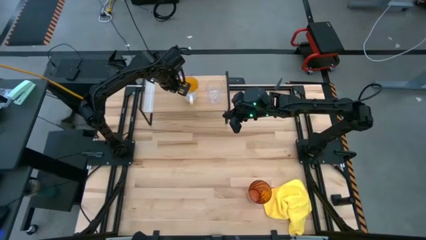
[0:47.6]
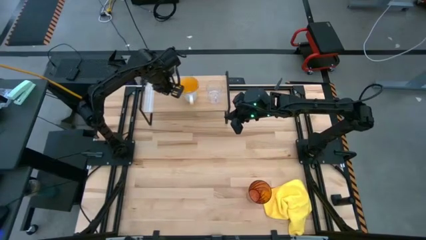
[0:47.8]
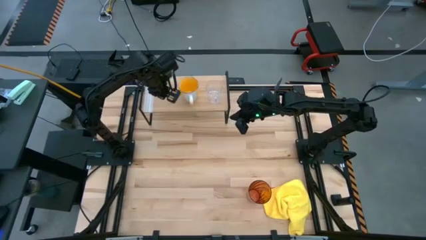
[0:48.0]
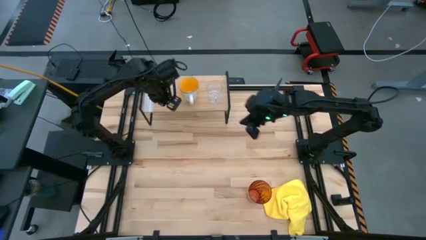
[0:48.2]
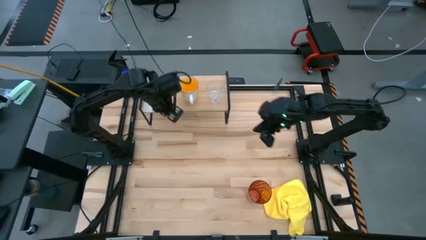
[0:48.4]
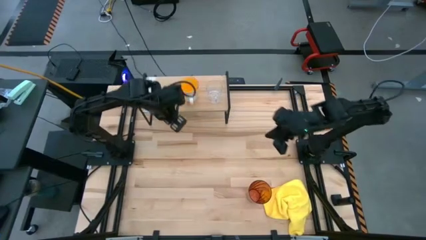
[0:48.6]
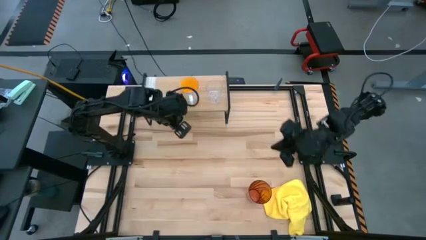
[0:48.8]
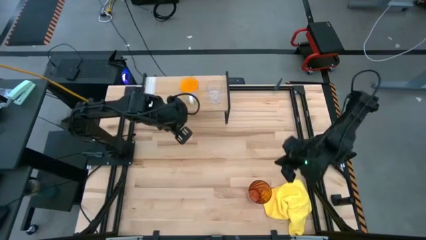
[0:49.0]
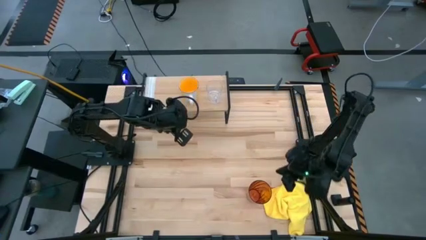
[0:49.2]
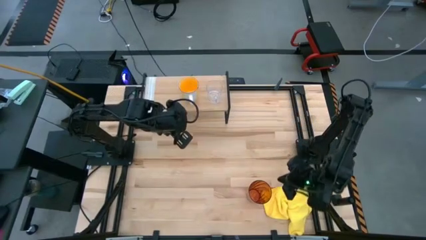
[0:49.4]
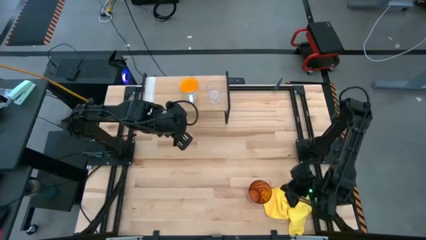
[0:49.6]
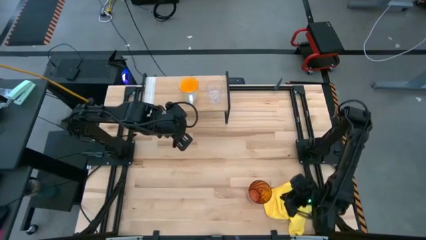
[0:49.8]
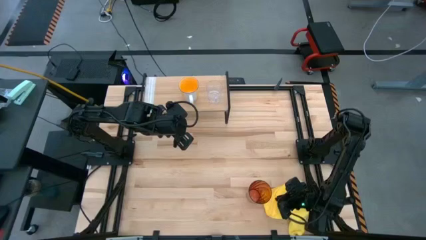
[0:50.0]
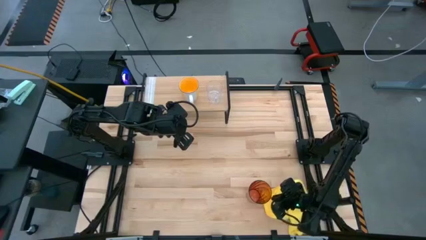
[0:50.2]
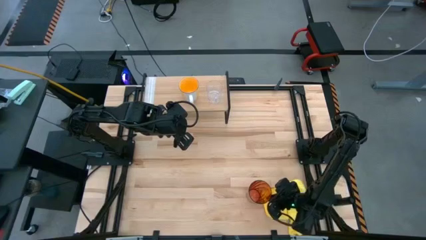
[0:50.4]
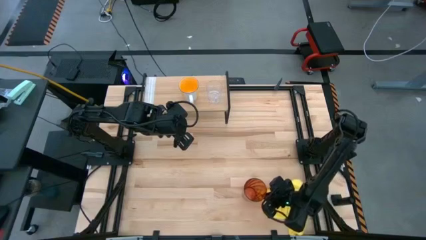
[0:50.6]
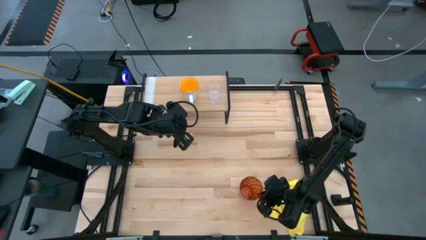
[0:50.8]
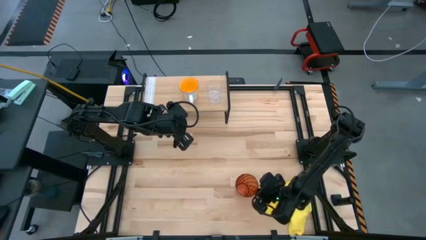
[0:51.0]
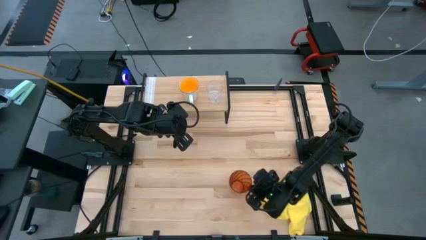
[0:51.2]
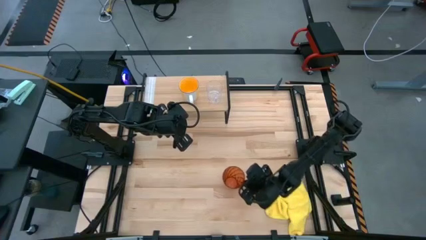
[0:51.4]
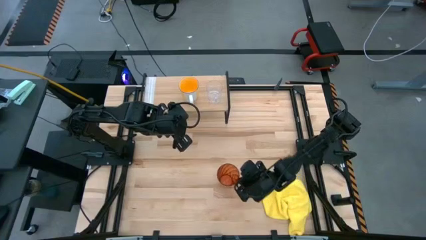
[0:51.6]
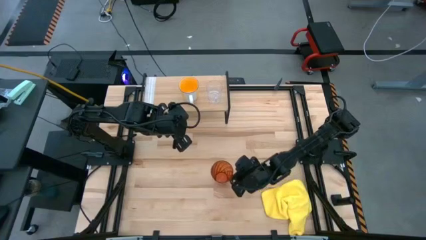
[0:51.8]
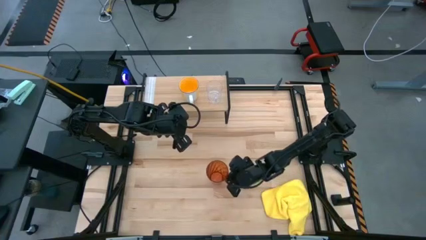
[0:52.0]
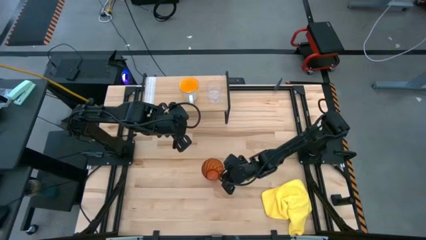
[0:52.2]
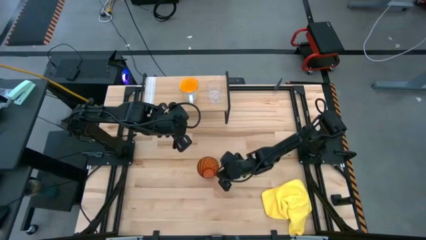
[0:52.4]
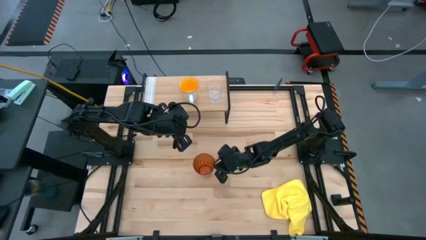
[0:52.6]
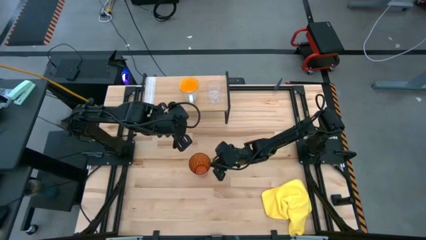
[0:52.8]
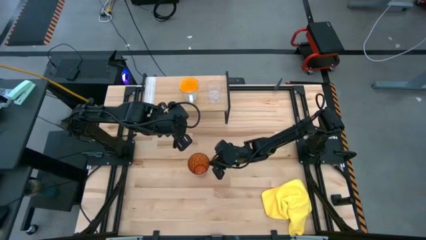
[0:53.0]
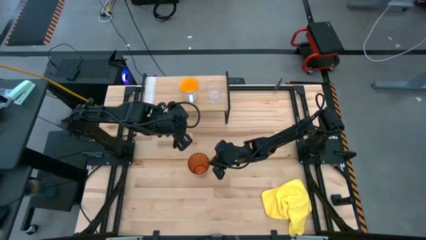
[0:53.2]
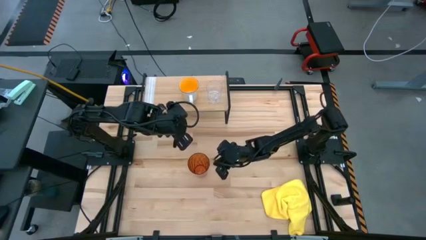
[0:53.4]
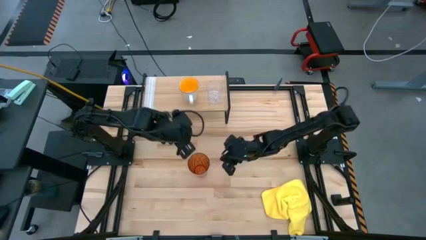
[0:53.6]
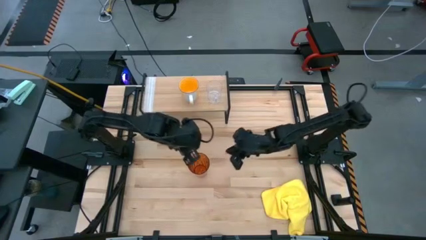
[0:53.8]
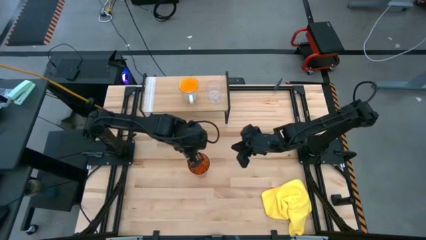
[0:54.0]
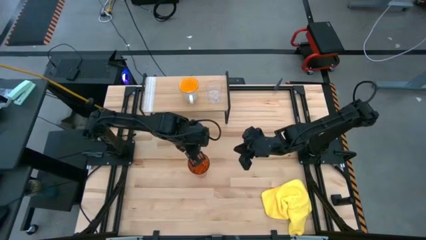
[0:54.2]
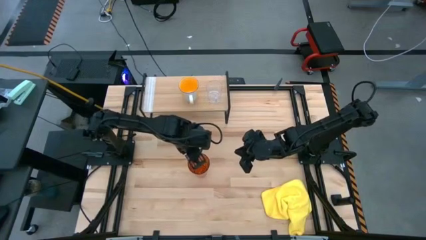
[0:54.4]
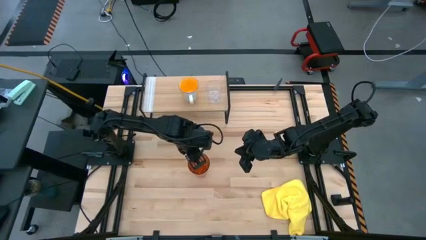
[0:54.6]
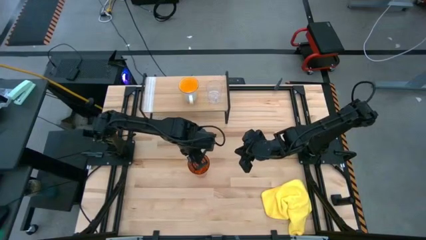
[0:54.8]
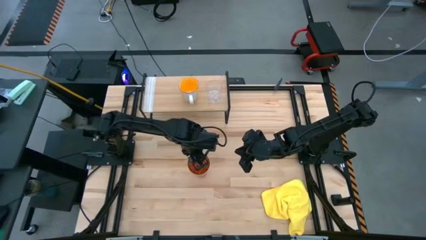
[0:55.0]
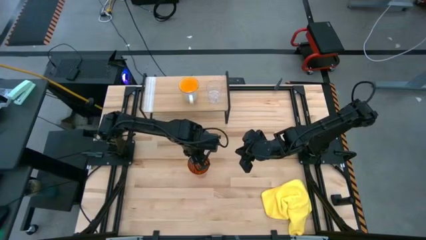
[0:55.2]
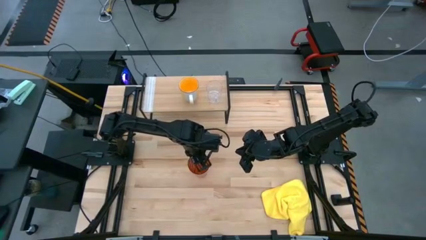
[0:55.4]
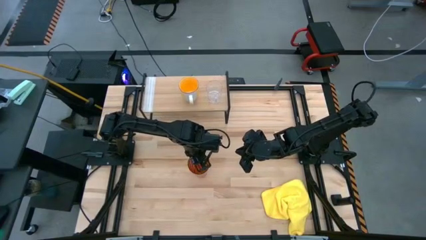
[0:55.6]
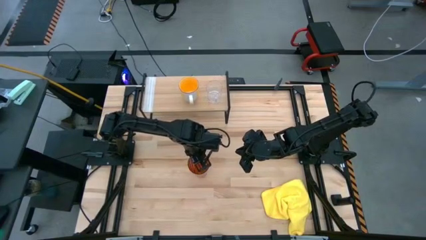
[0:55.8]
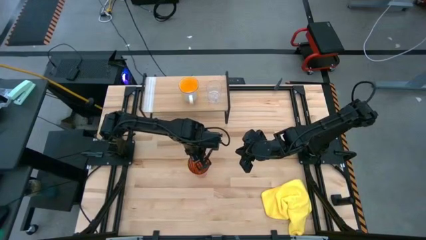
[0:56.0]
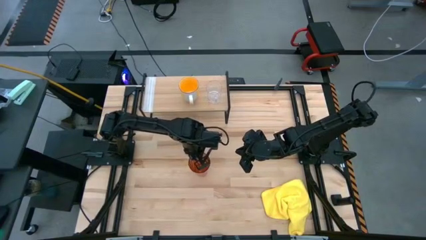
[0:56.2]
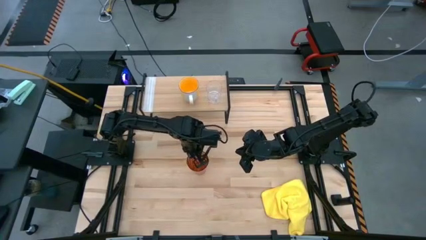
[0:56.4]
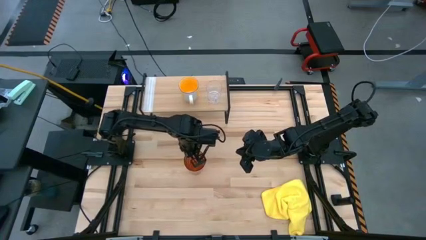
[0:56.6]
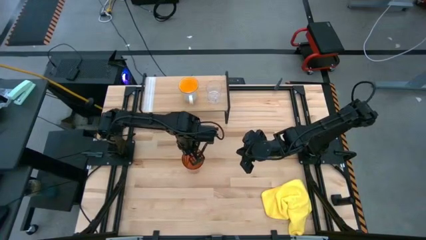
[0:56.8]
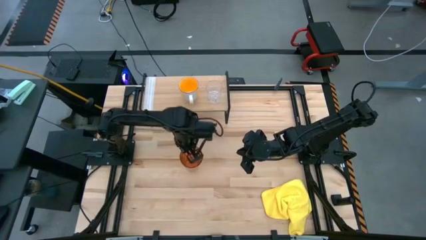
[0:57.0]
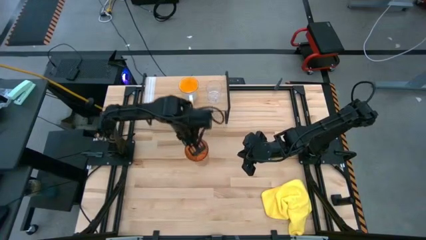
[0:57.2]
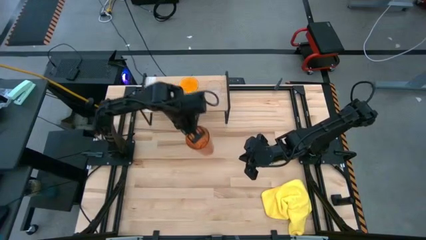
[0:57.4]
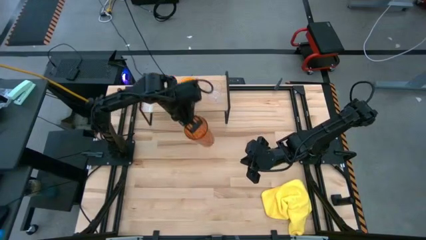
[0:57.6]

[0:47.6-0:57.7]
Task: Stack small to large cups/mugs on shelf
Put the orange cup on the shelf

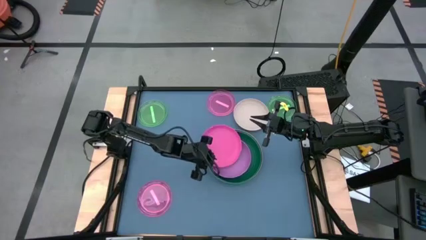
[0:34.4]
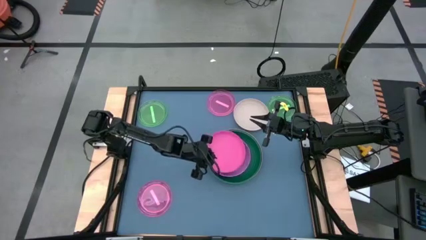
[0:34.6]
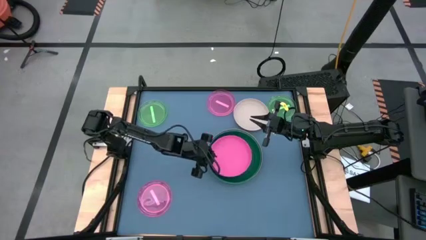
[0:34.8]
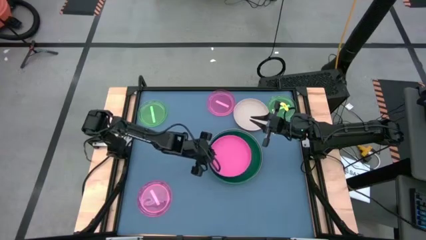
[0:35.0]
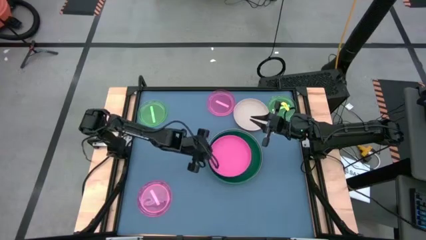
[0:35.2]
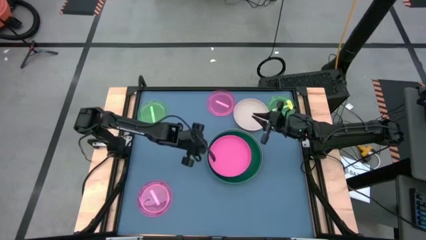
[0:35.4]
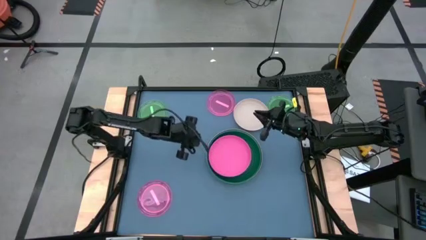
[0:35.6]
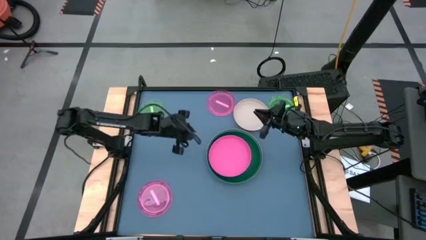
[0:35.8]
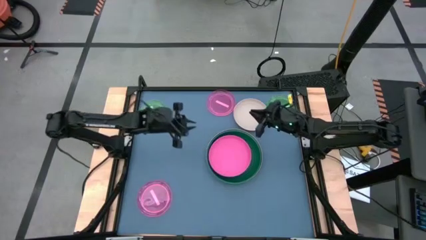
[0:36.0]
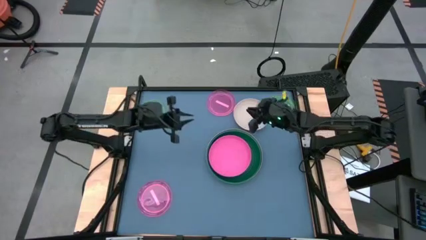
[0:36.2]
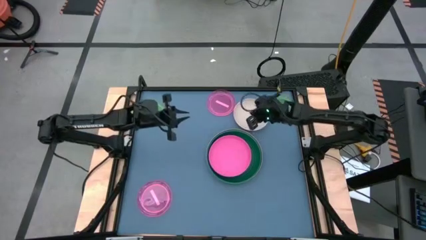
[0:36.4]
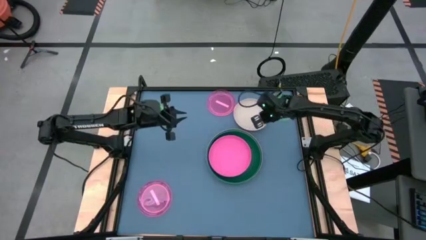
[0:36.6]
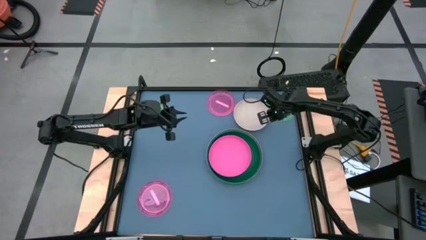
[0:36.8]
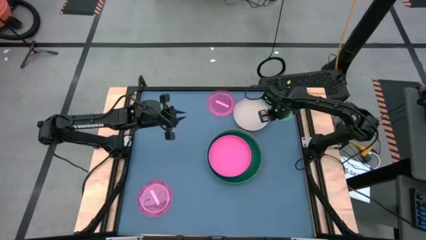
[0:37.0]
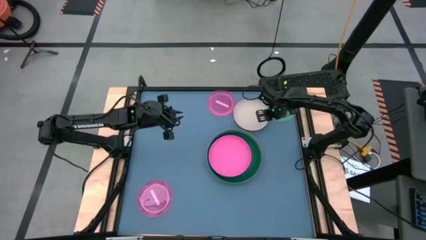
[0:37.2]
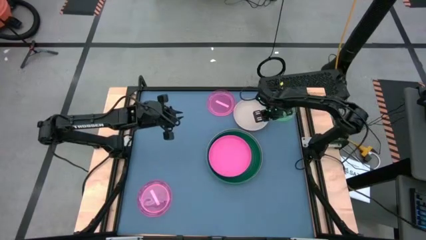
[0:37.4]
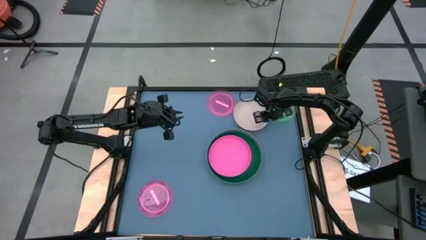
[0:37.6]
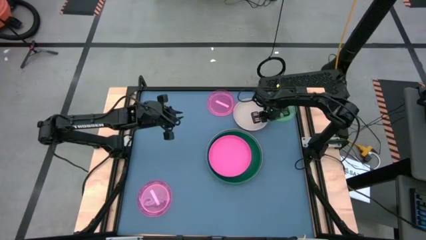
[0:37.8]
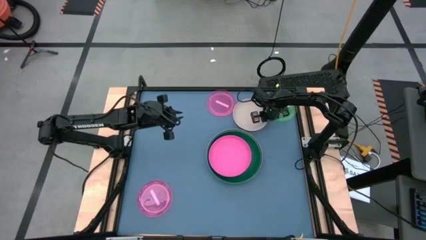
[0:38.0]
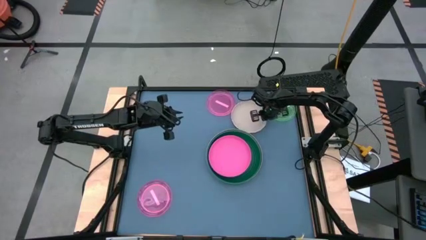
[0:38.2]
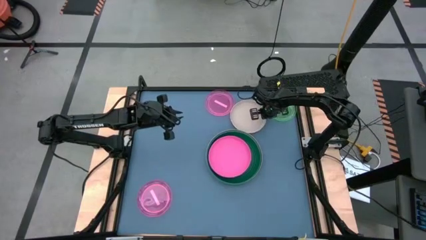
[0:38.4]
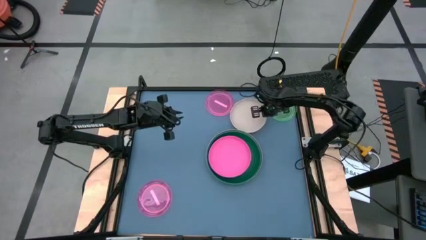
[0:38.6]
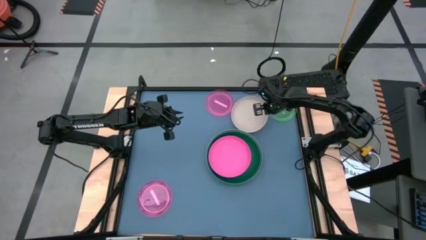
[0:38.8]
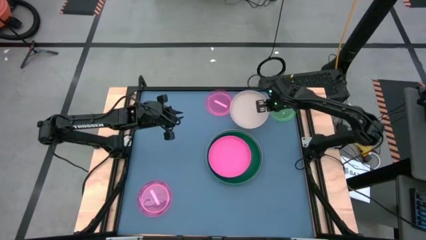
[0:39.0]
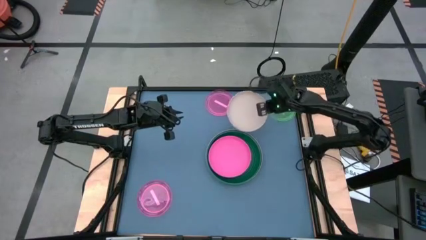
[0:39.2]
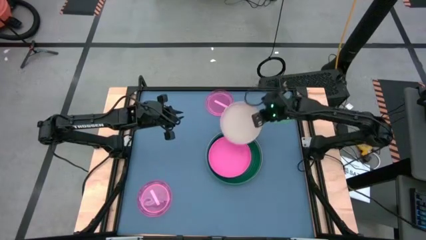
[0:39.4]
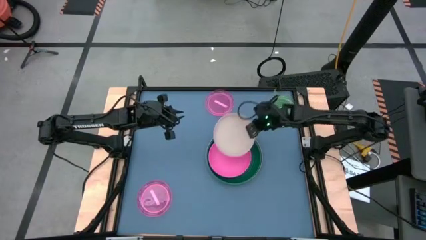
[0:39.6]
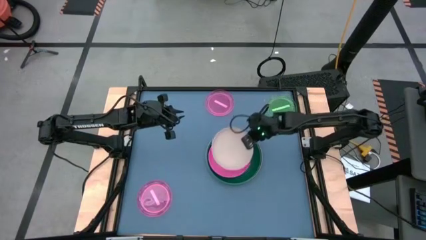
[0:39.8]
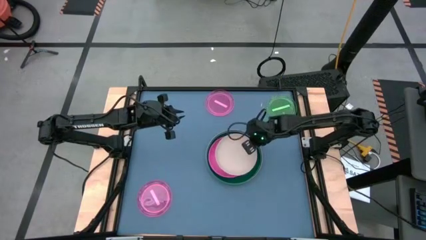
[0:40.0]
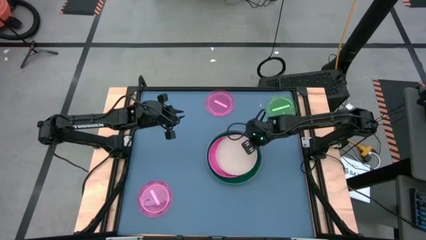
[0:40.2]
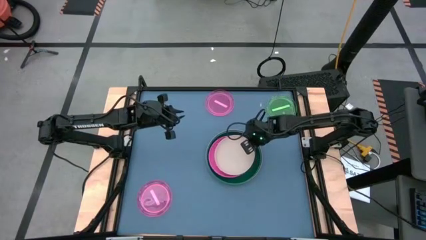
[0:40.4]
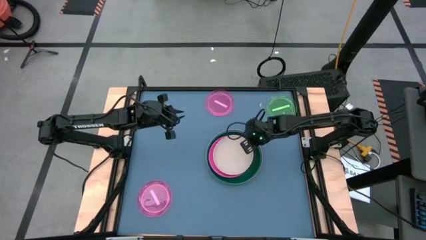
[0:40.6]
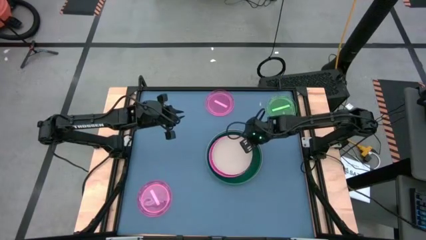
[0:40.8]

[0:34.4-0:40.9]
Task: Stack plastic plates
Stack the white plate on top of the pink plate
